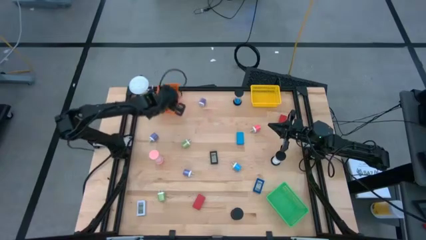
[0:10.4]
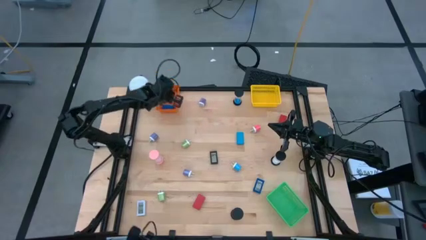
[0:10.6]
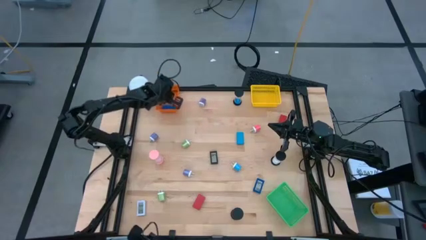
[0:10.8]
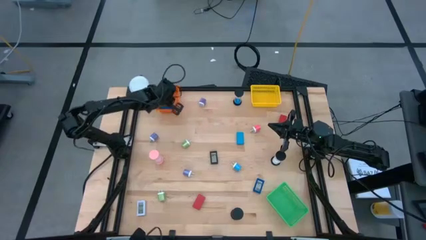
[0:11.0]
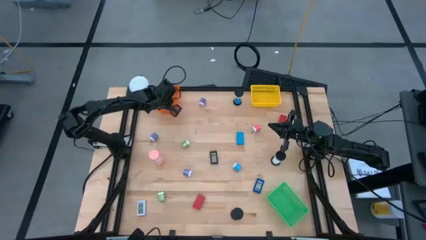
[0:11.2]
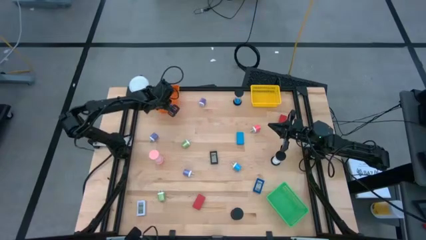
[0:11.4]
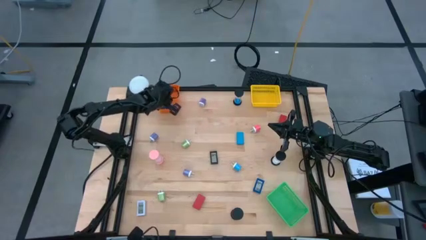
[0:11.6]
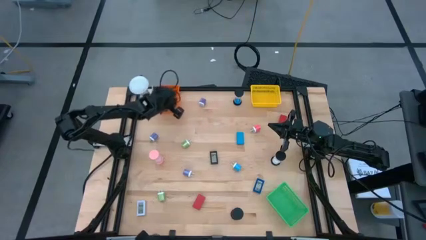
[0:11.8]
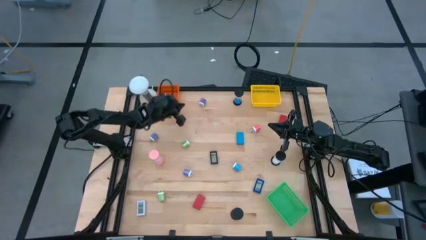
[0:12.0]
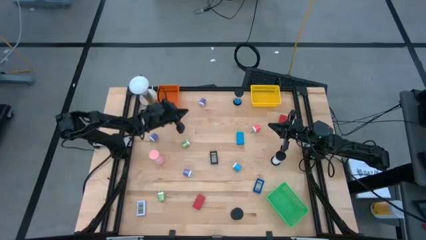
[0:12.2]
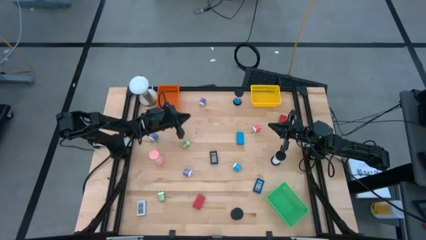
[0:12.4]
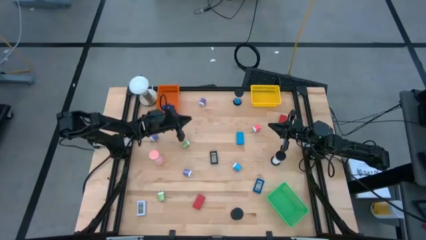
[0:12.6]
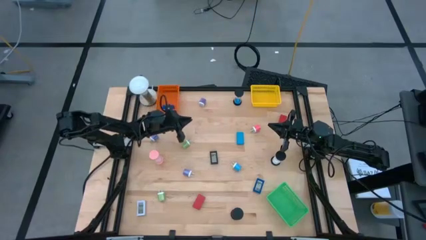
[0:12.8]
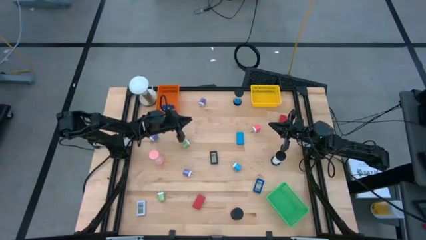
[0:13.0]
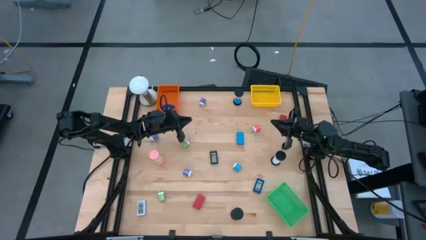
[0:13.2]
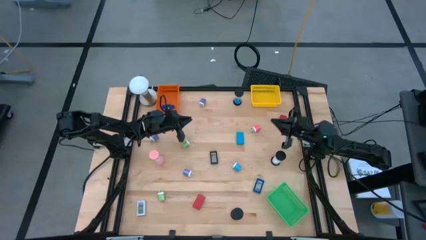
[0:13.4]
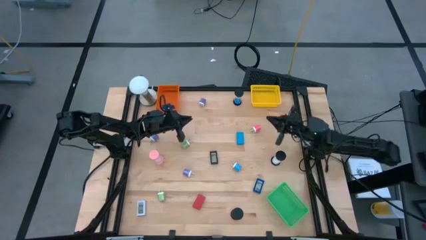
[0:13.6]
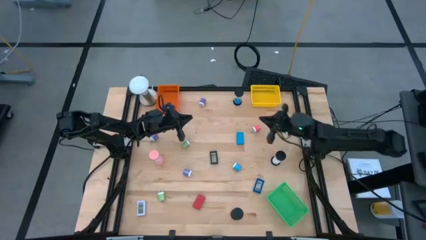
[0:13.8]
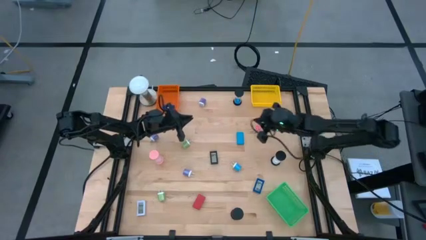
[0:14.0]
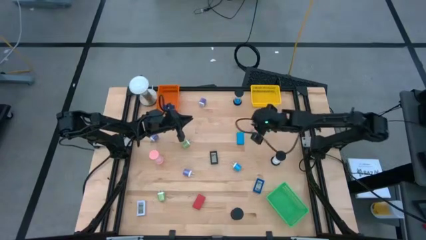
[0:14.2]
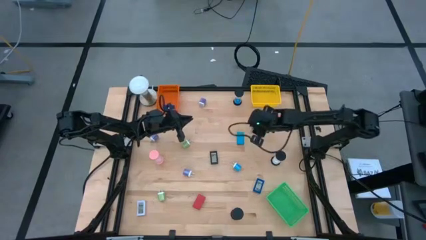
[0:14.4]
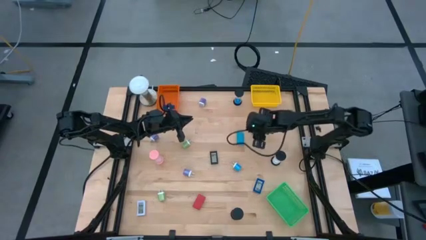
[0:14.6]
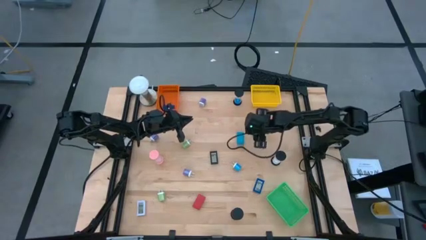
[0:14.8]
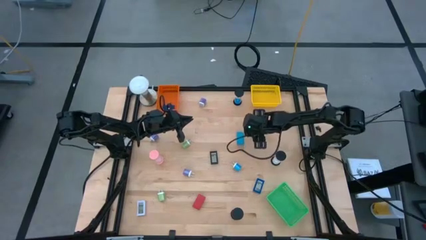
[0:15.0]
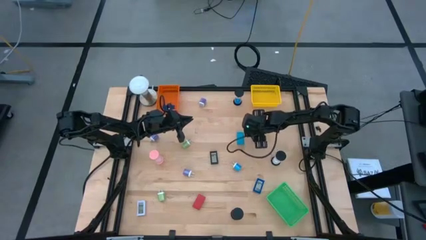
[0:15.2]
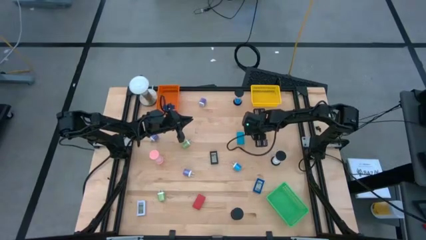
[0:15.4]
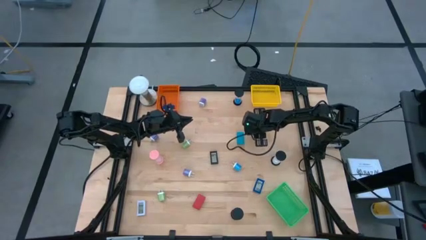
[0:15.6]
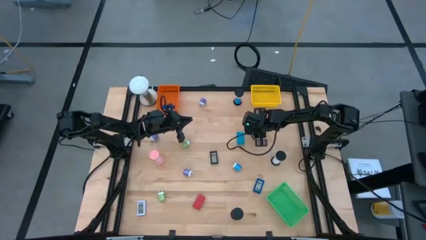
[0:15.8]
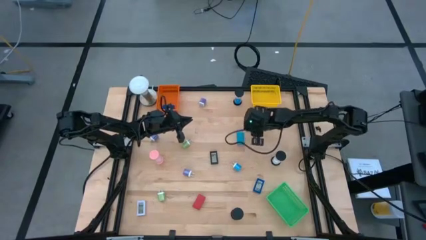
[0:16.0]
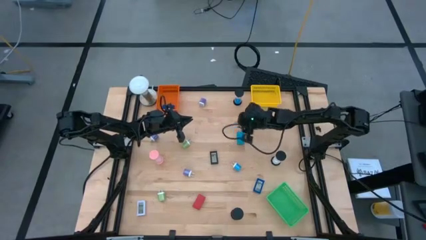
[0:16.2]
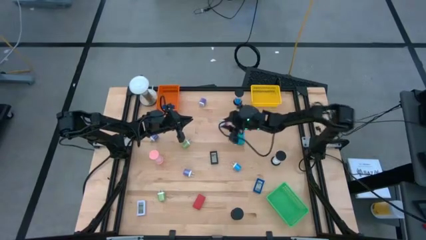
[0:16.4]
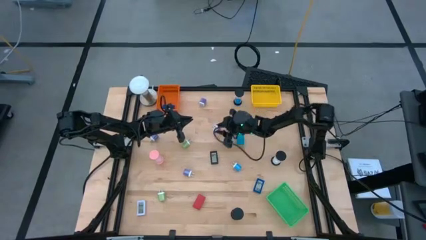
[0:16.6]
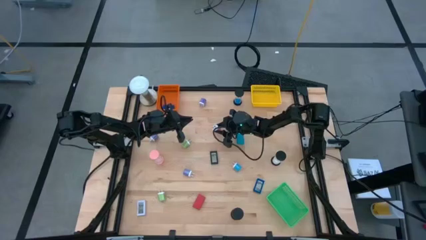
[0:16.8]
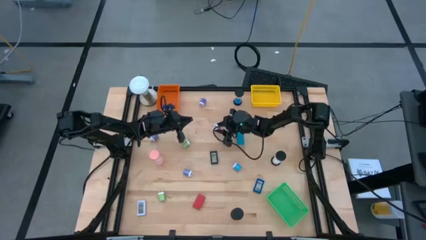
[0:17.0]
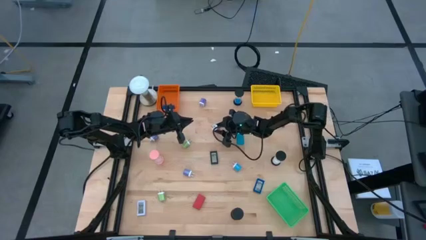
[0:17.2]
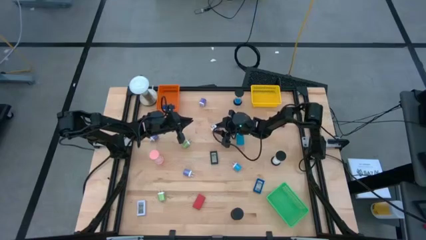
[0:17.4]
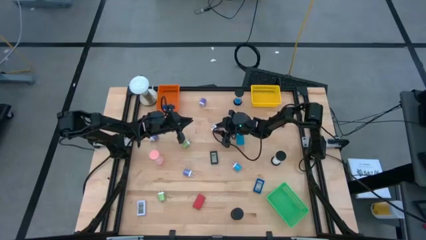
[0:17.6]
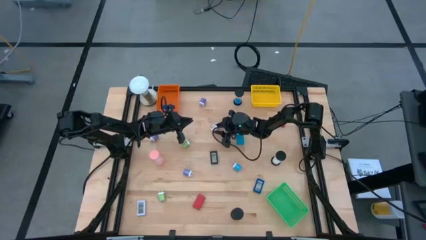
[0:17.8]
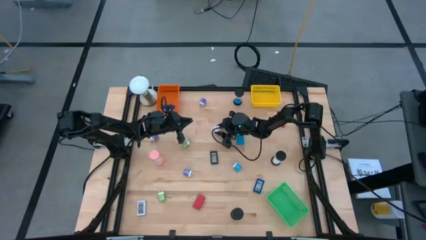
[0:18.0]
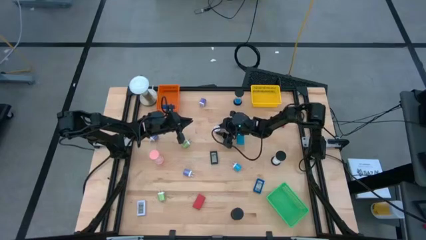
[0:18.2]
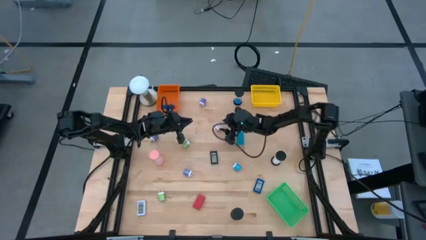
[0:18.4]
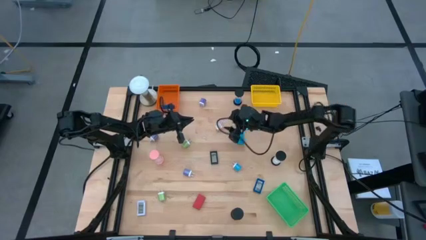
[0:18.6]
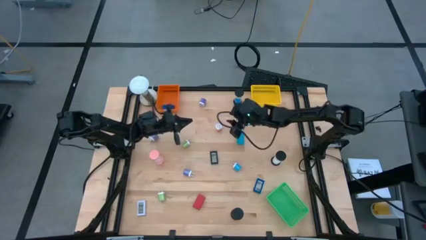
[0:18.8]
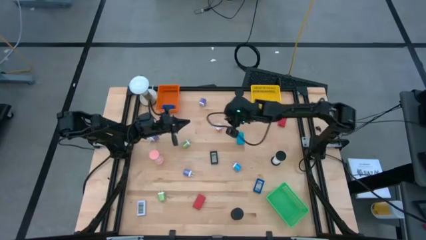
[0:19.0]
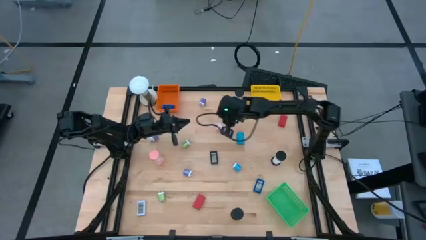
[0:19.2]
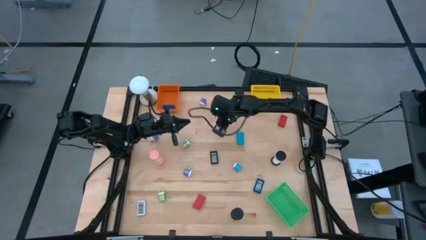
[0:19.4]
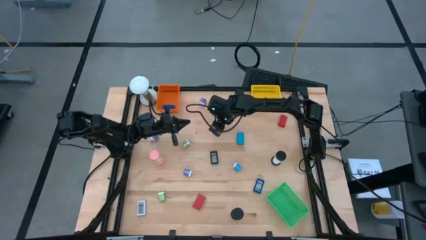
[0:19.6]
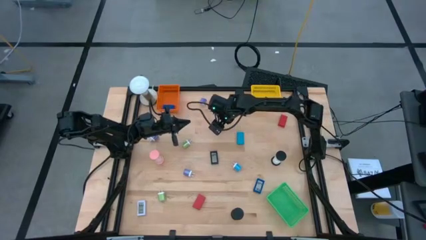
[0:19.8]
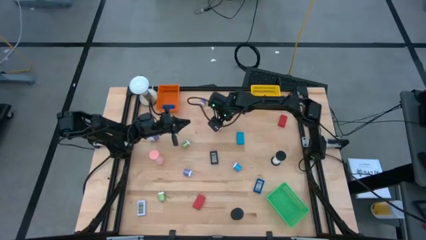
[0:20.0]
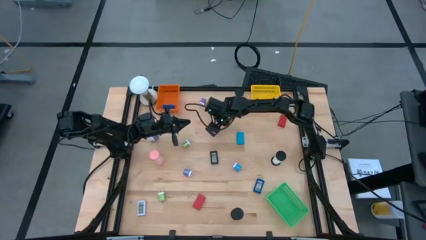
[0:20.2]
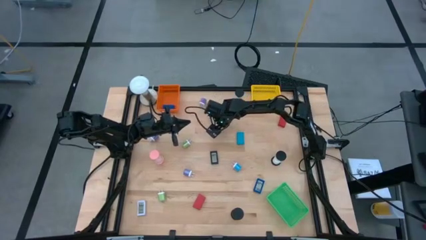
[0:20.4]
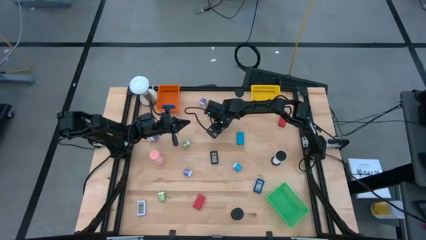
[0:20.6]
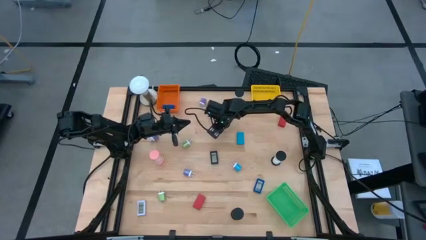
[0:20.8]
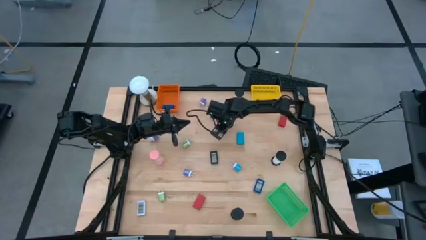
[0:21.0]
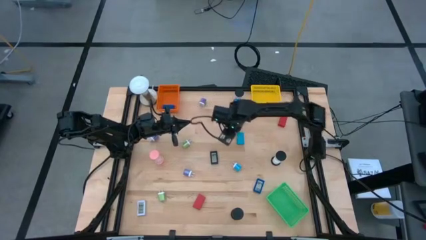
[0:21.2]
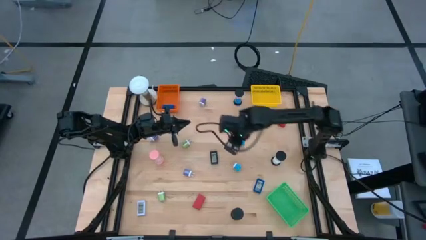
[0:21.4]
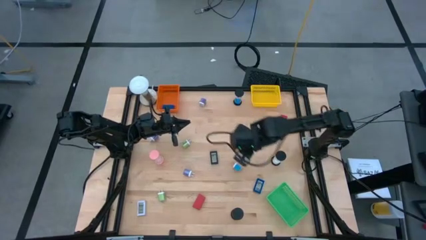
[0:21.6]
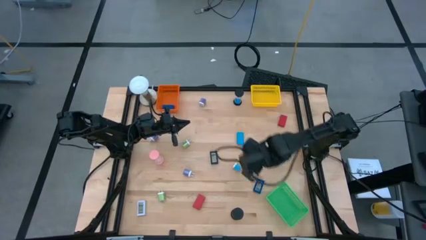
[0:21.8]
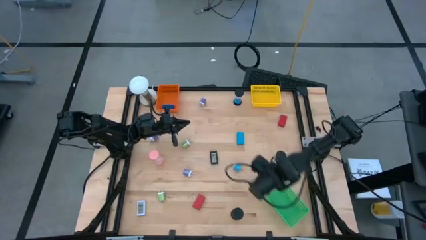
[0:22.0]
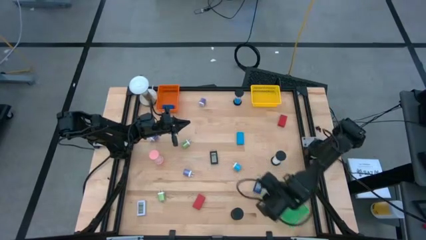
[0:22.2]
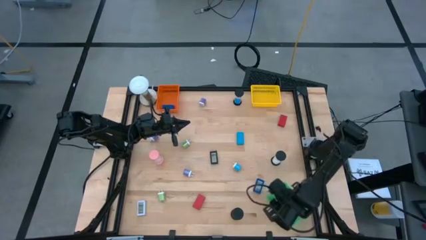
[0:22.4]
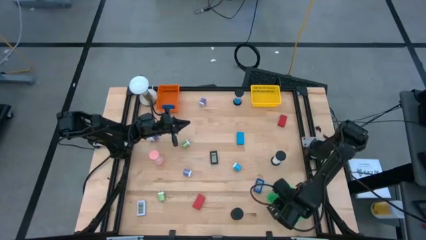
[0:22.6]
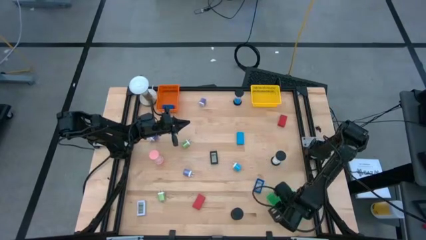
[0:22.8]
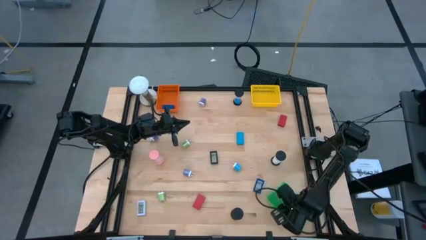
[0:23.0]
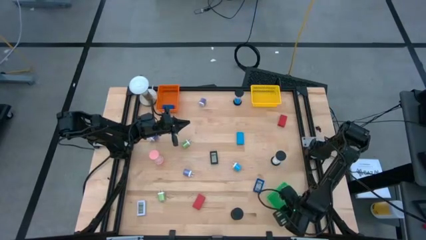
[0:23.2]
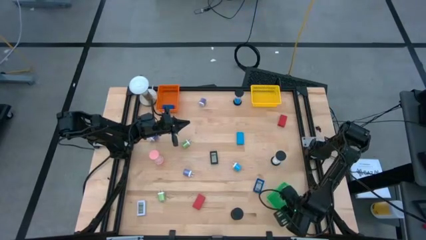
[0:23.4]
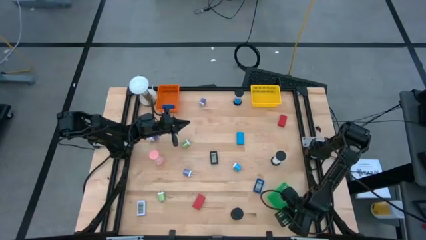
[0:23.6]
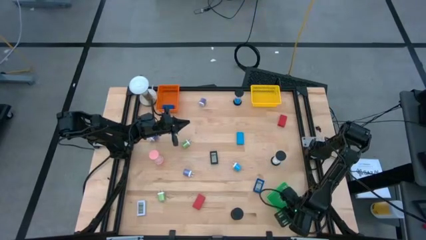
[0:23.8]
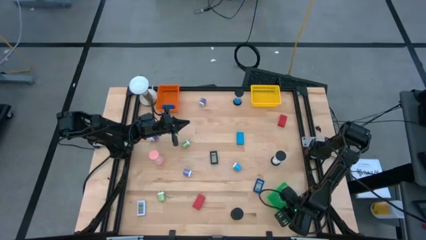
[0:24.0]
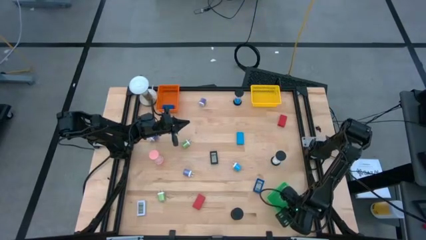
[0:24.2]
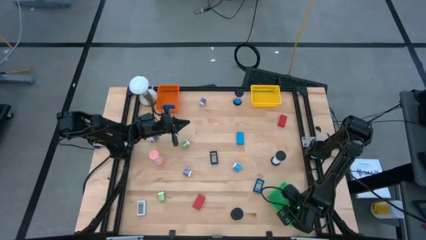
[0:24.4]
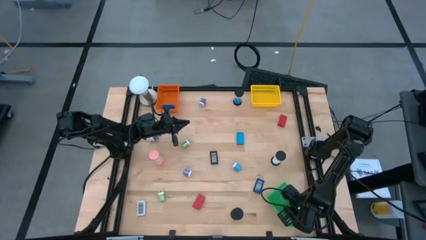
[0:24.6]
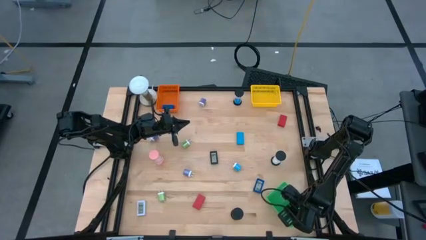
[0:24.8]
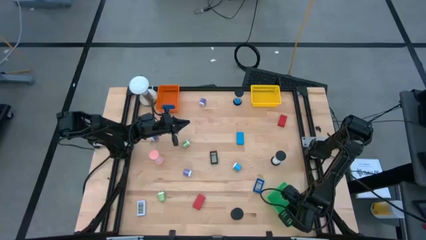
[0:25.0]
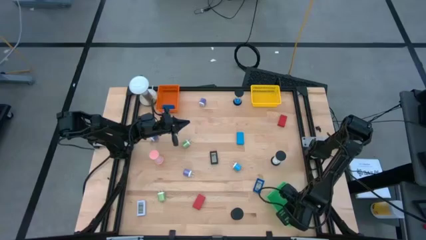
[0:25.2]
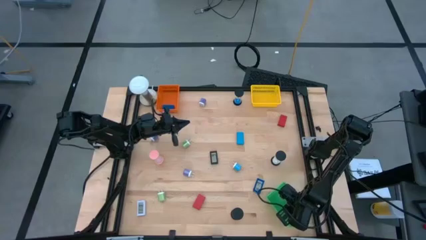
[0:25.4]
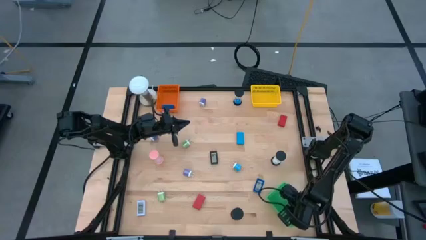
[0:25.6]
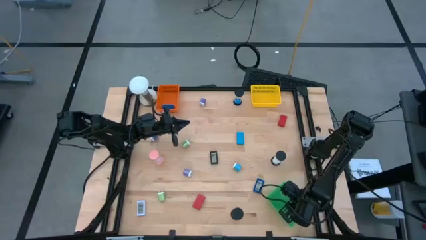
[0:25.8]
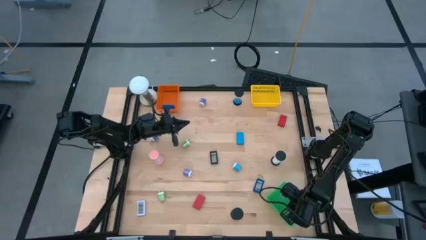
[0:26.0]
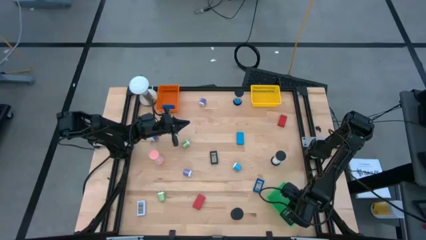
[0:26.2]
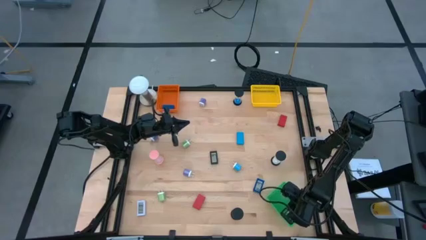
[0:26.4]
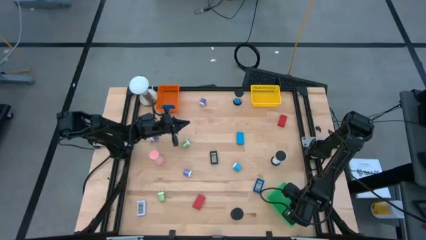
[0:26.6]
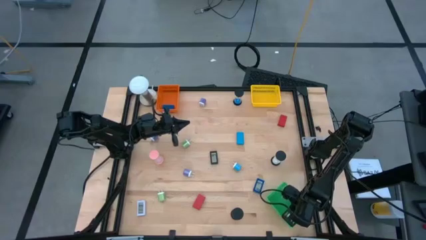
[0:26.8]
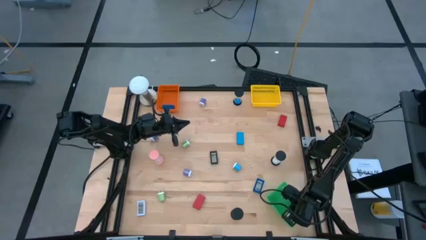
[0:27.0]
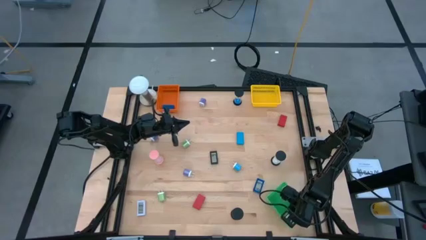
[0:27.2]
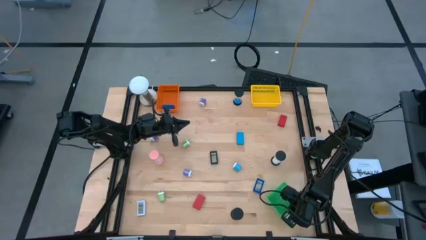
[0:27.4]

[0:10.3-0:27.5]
Task: Pick & Place Office items
Put the pink charger adapter into the green bin
